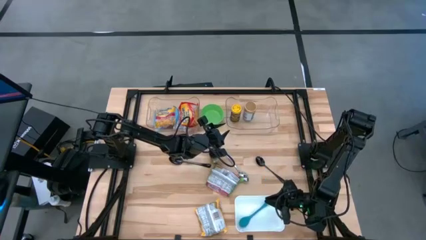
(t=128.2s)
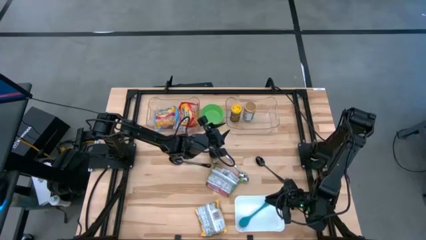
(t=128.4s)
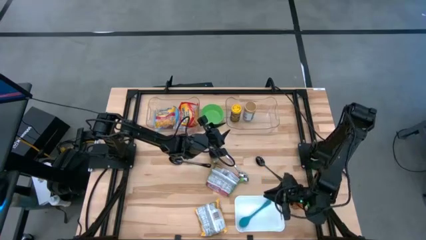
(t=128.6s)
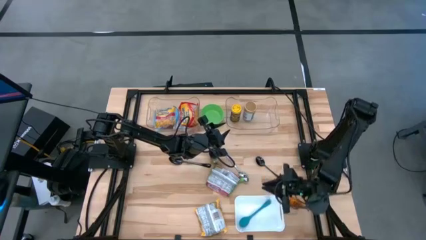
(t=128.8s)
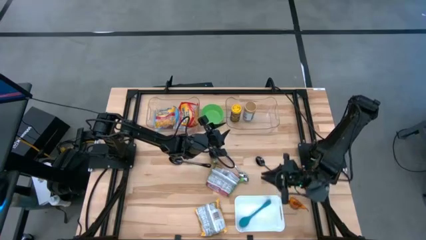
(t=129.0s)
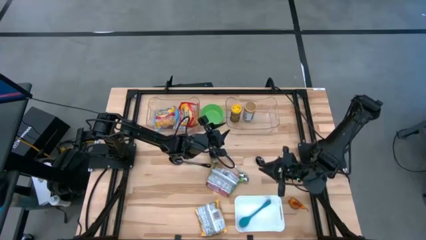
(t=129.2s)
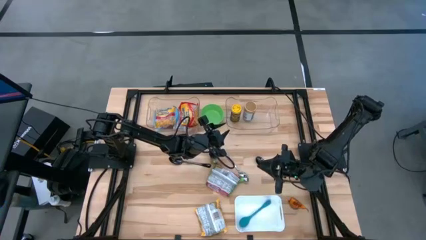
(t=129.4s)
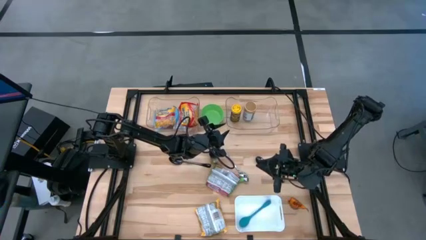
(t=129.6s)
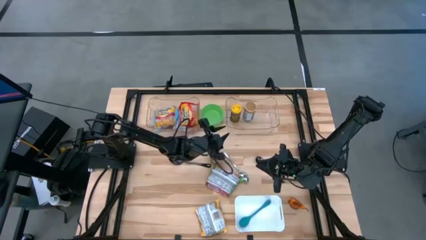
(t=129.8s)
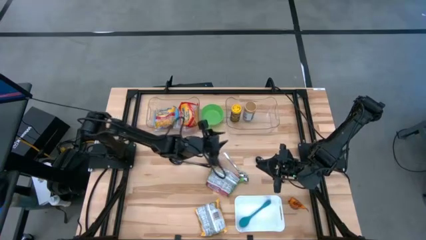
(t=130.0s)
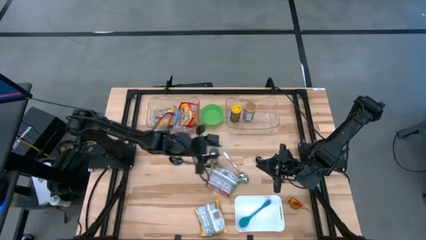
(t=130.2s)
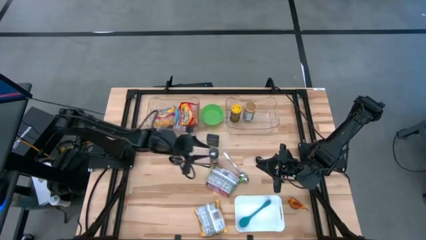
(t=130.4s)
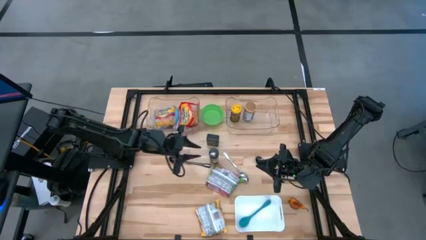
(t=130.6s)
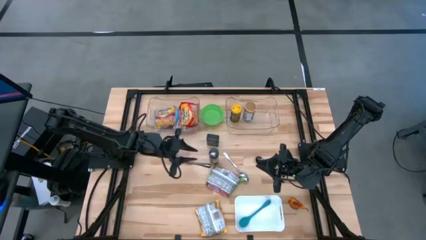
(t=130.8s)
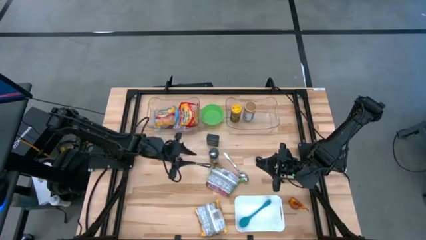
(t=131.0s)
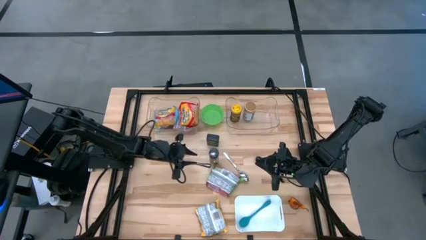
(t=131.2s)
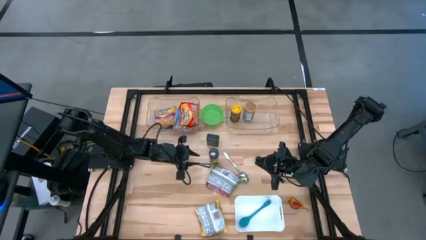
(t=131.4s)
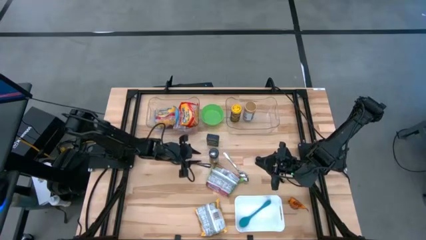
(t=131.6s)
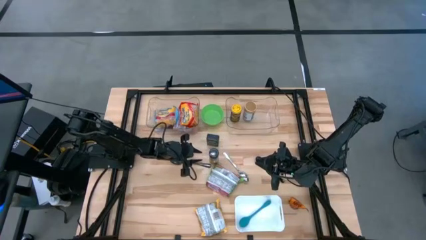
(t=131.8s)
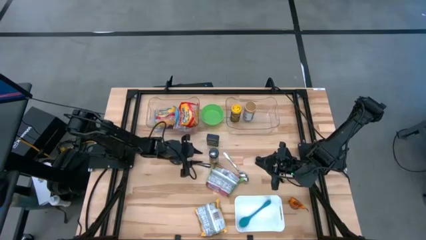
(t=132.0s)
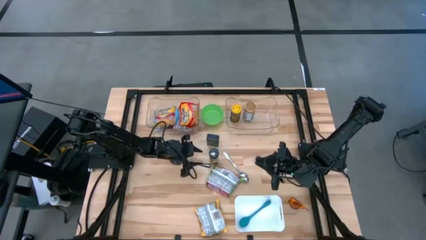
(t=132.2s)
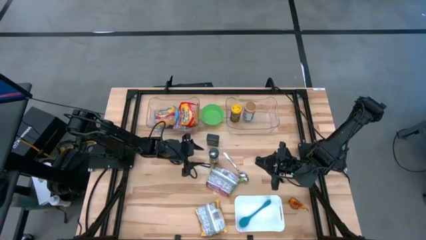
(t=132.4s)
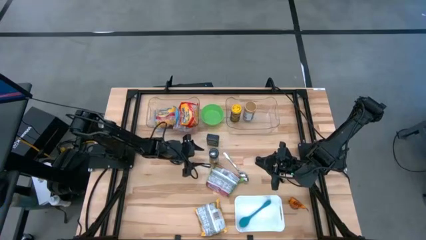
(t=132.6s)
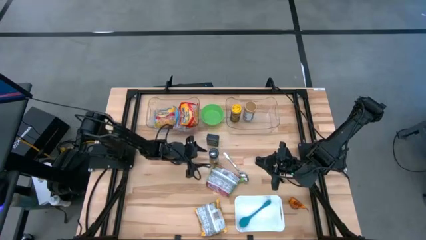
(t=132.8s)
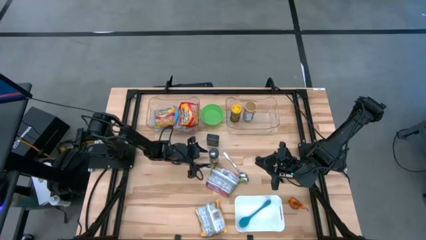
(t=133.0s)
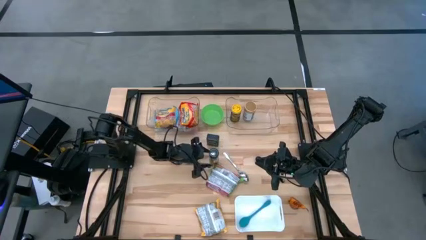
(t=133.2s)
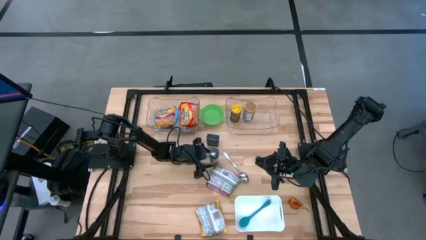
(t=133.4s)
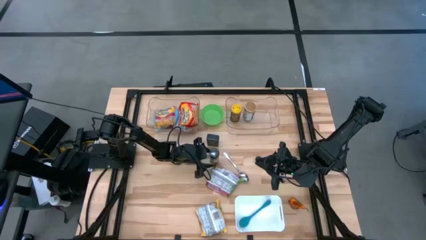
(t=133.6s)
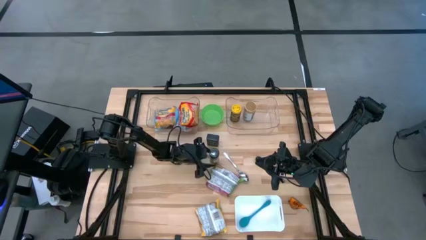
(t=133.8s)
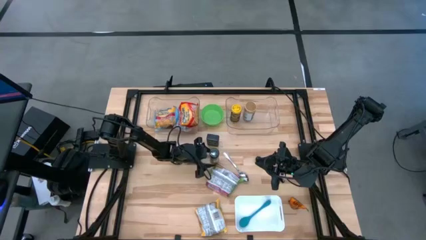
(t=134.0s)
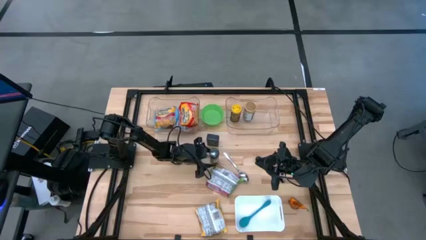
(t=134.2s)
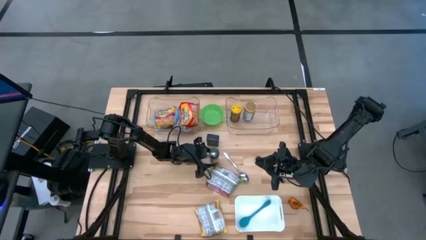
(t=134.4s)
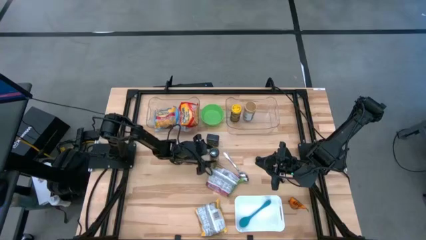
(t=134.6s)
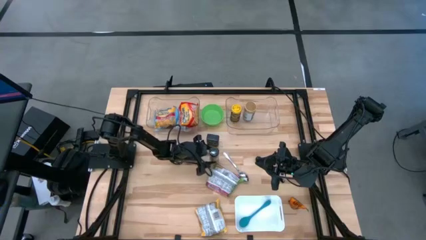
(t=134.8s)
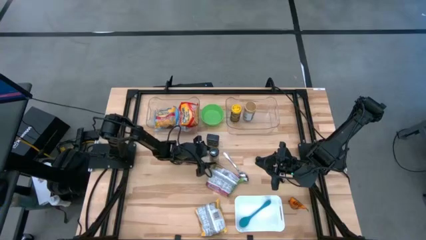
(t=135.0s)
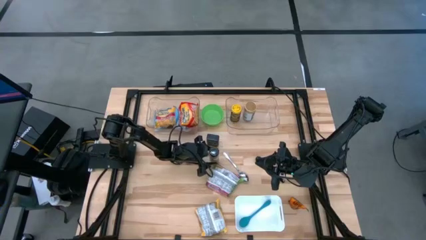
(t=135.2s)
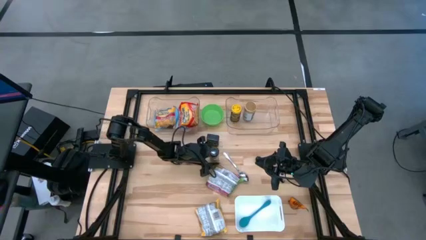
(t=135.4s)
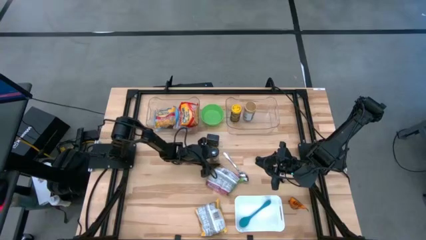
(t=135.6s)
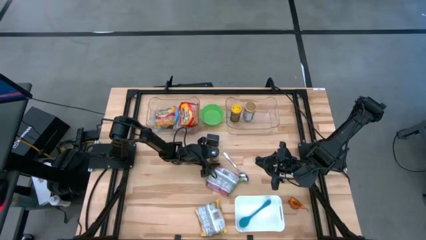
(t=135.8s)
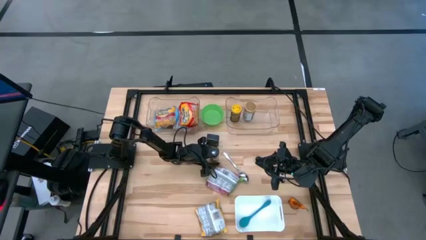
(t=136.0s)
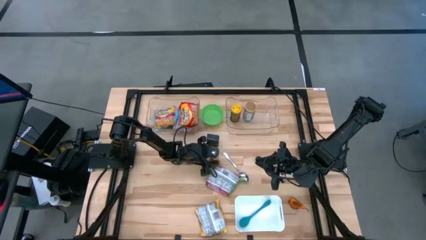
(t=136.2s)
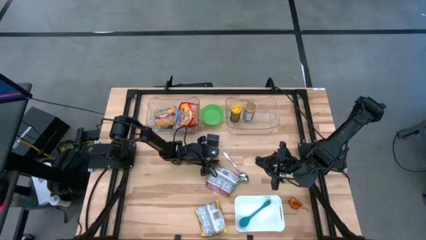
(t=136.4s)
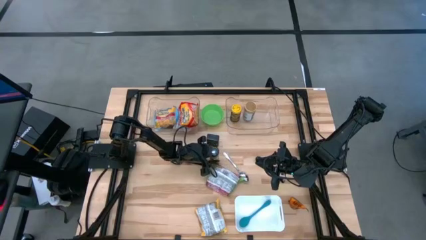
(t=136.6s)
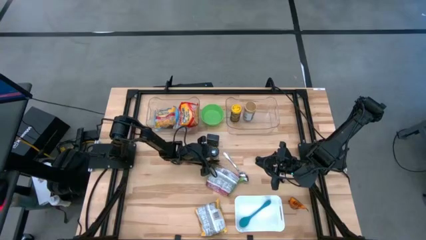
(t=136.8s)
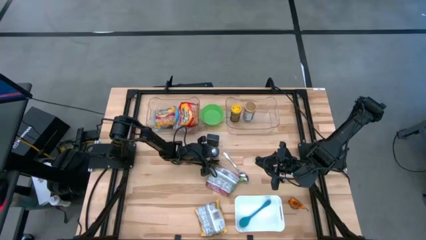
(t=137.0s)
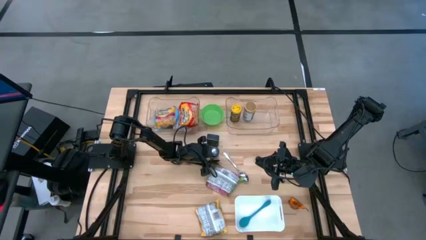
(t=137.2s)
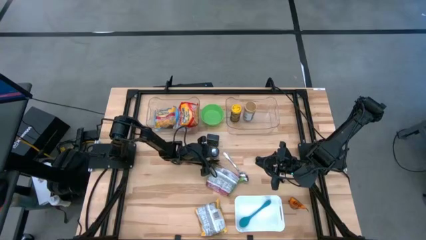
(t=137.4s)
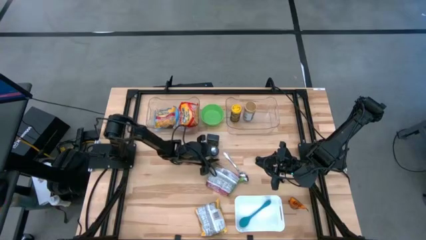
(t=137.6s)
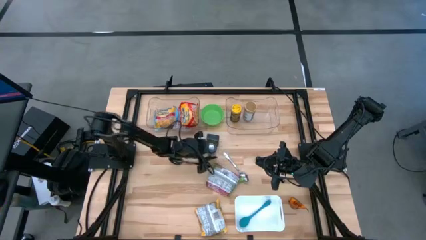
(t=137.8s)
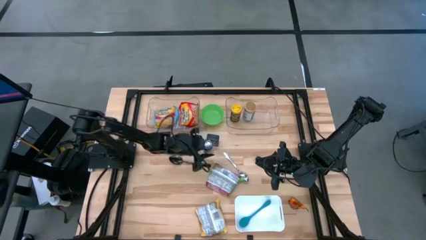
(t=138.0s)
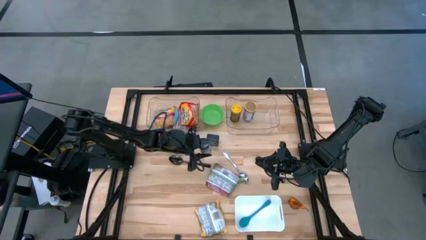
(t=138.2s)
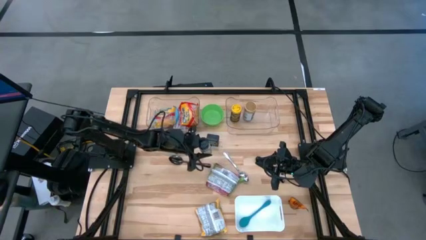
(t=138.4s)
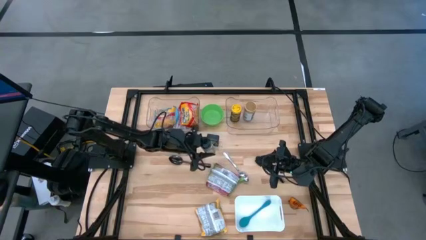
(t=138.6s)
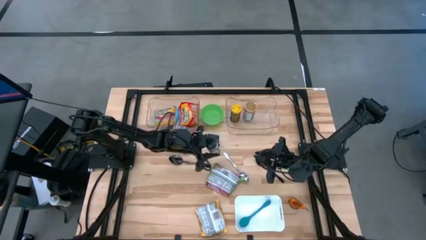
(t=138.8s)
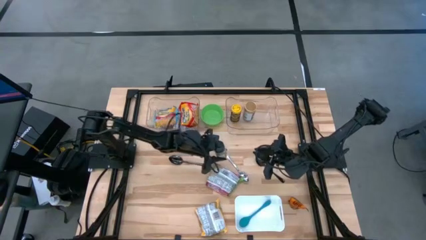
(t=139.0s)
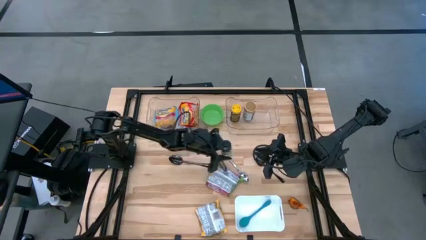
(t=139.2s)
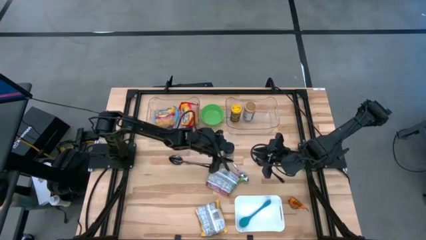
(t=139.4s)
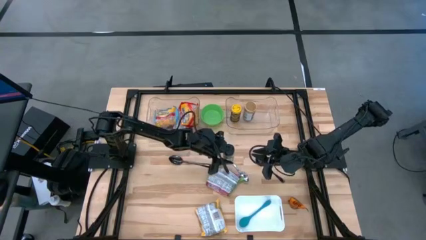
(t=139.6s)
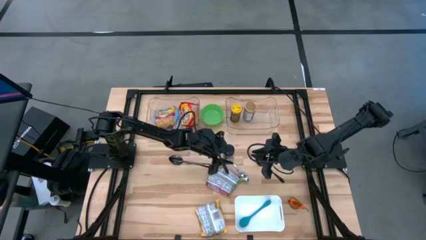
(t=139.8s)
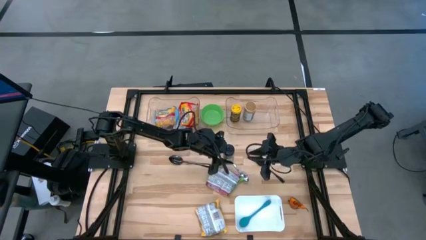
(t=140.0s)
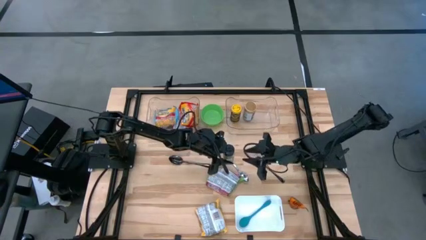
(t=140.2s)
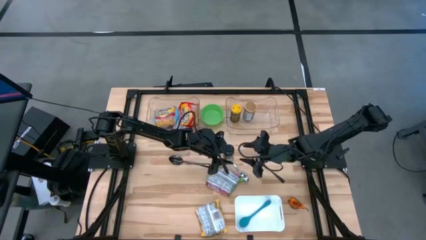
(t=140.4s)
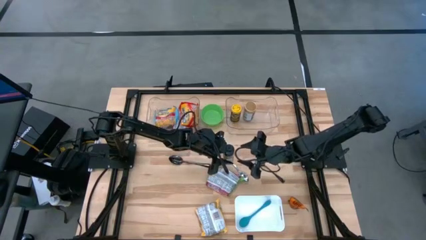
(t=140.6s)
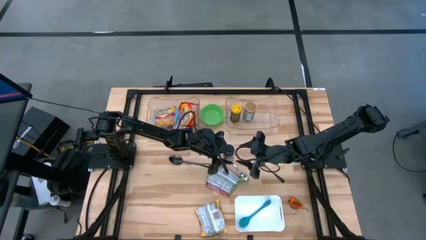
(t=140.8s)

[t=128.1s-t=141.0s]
Task: Pick & Place Food Item
Put the transparent spice bottle in the right transparent bin
